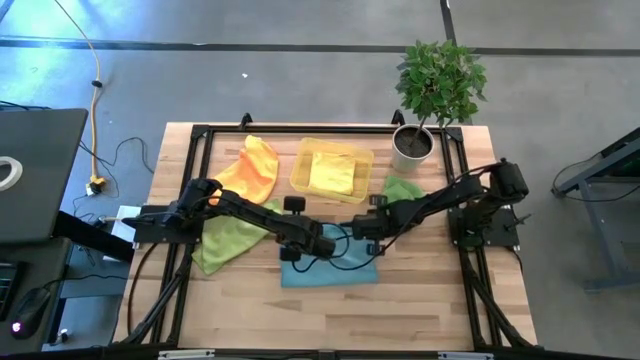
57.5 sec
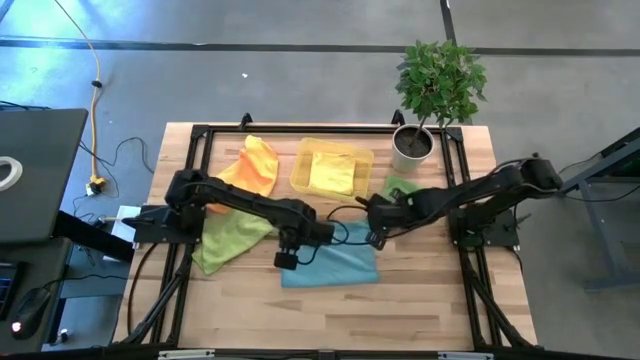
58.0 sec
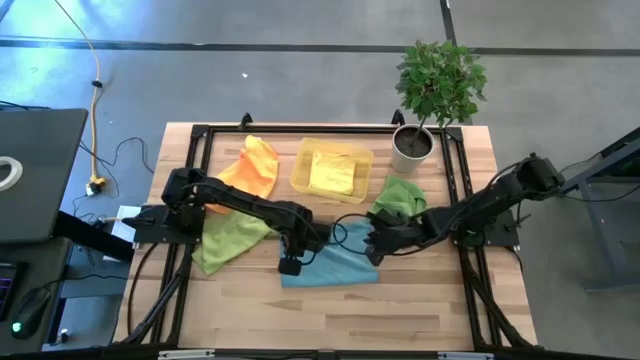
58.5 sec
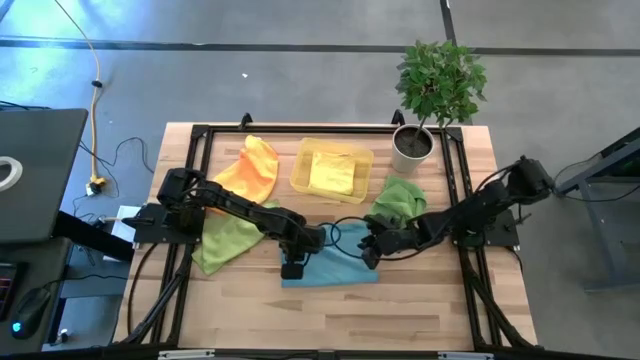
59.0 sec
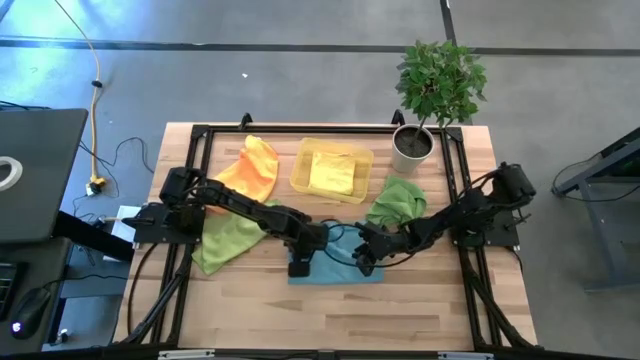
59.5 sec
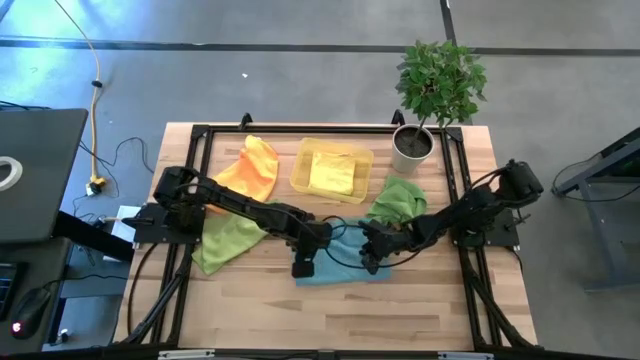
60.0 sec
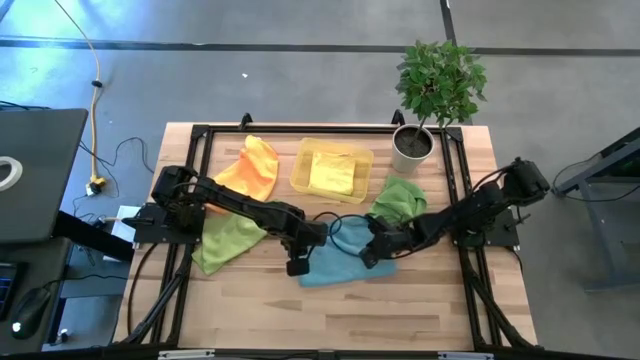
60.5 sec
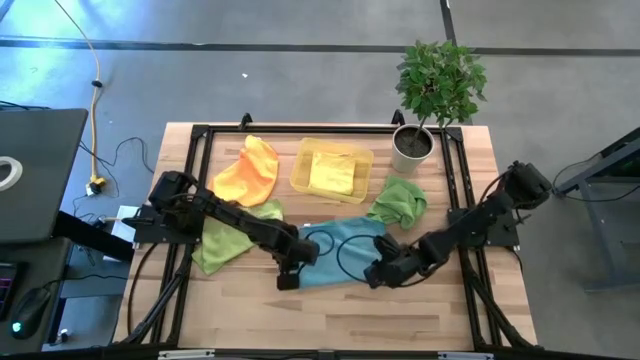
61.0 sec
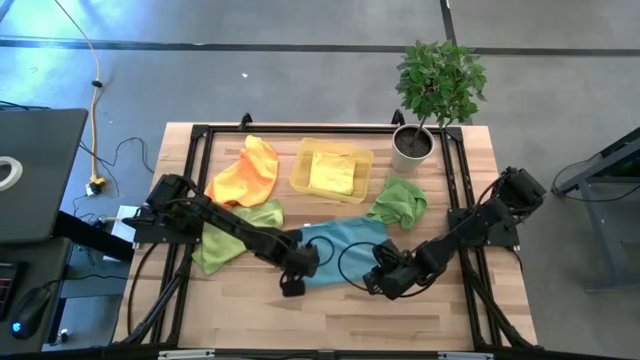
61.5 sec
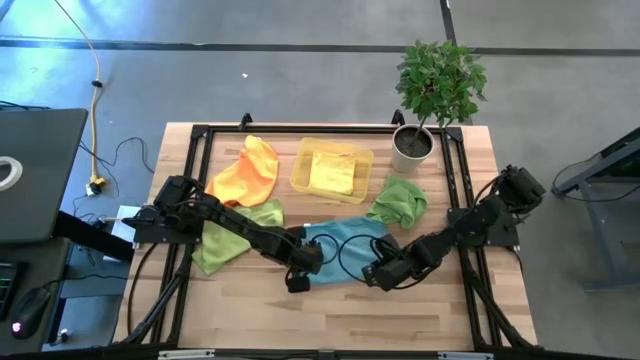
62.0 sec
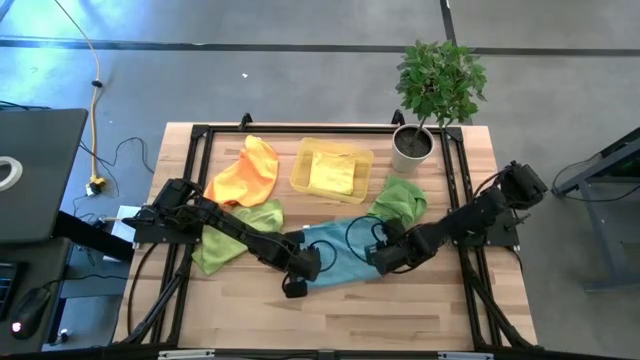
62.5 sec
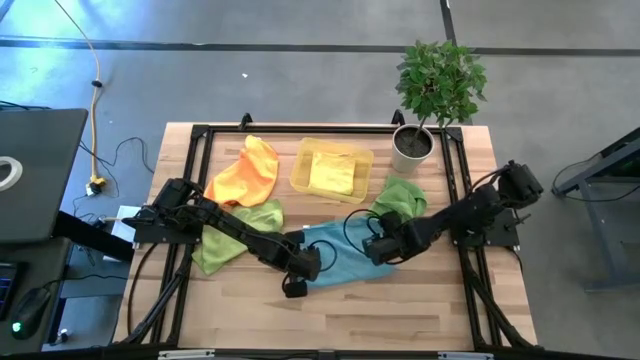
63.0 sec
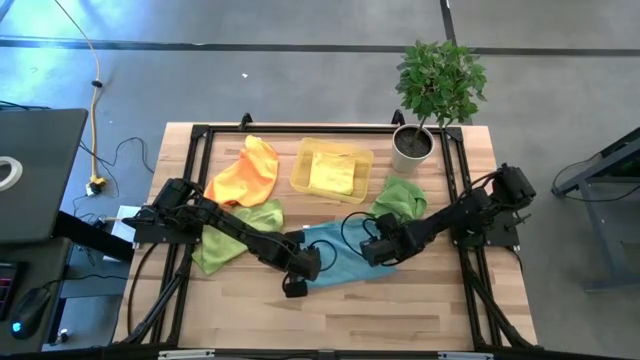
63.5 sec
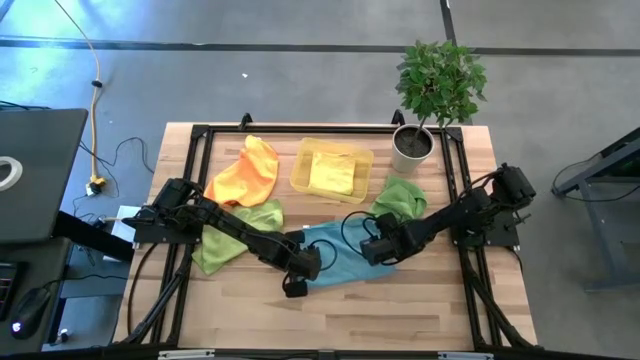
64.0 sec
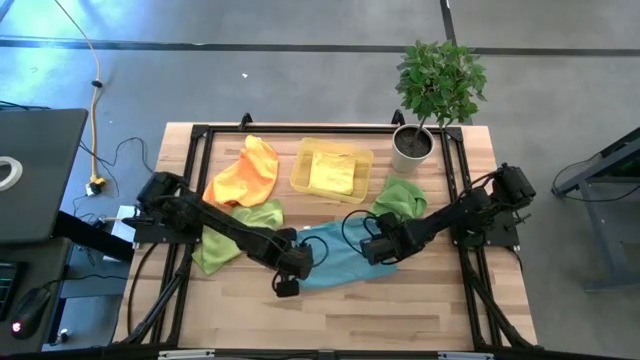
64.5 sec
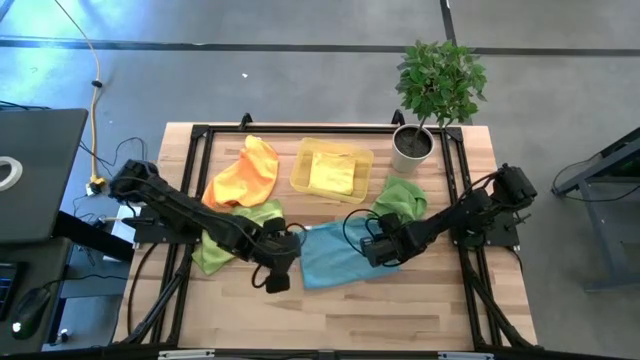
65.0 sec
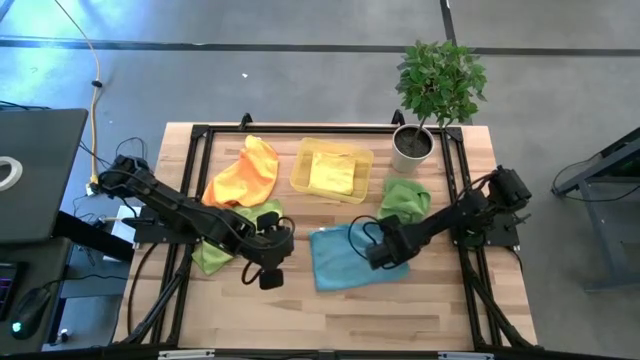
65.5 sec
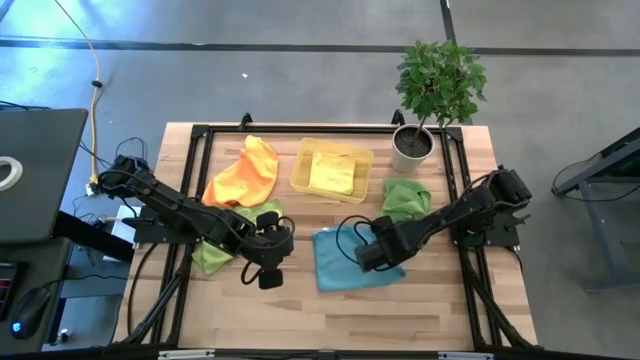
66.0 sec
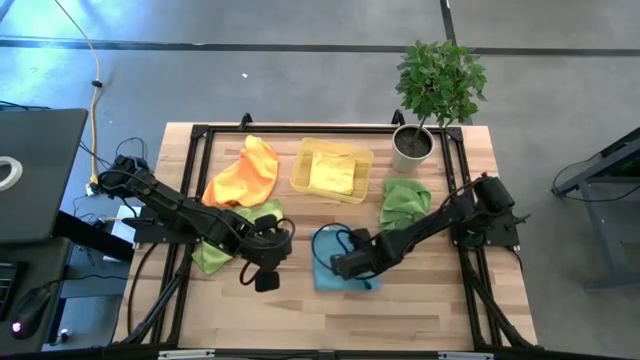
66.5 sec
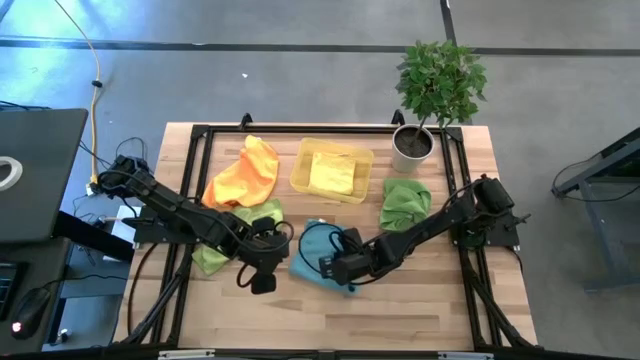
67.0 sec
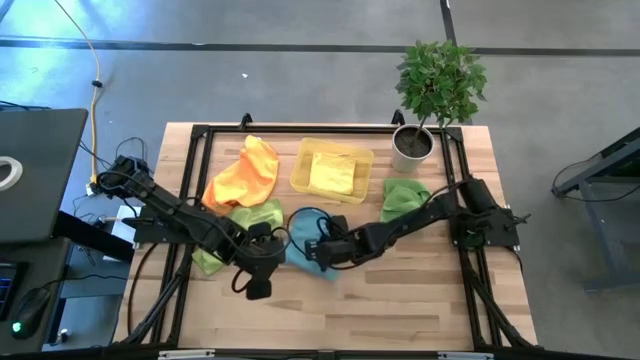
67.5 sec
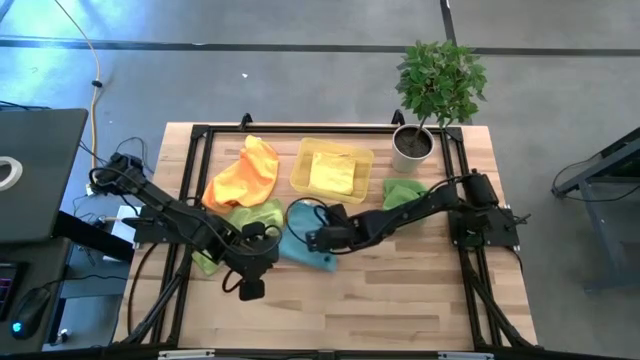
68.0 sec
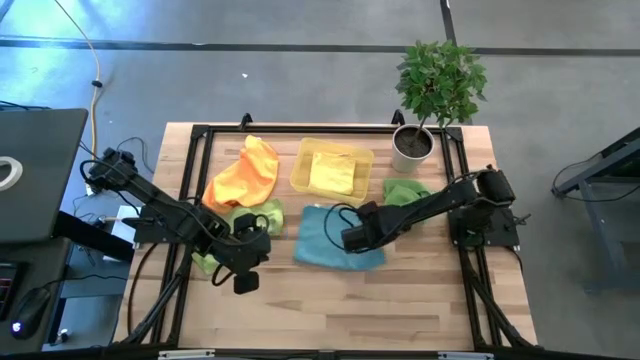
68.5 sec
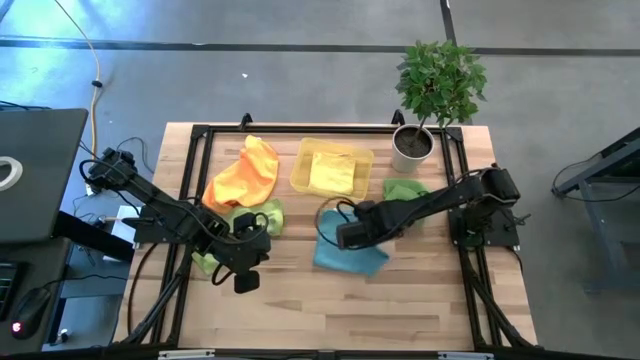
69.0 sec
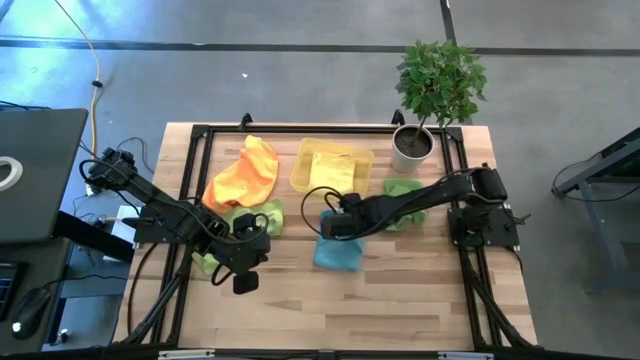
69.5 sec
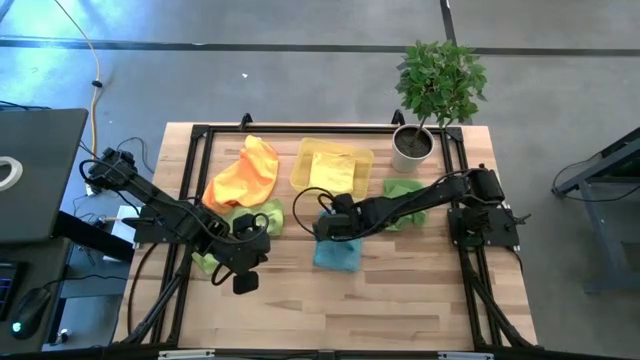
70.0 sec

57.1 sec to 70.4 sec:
Task: Fold microfiber towels
Fold the blue microfiber towel

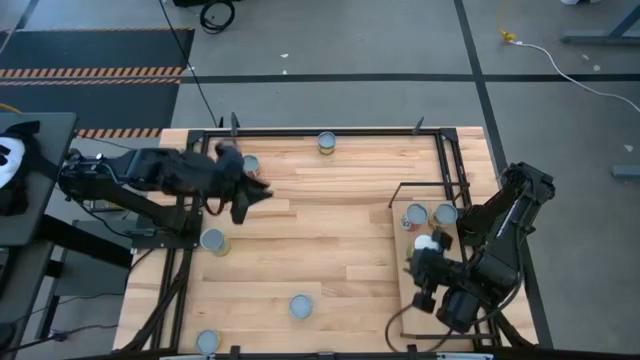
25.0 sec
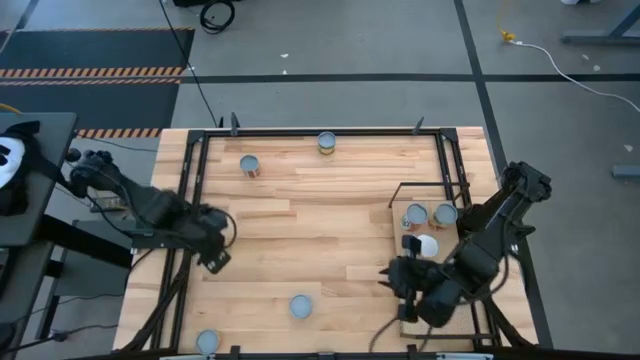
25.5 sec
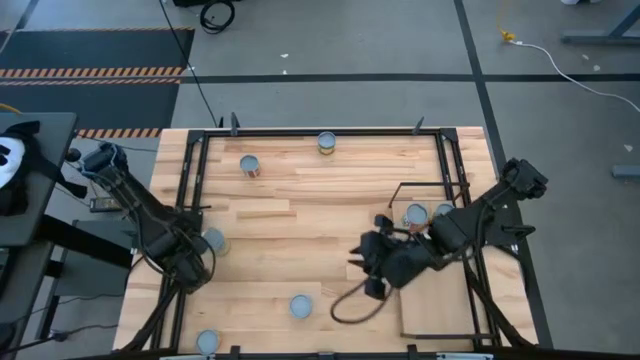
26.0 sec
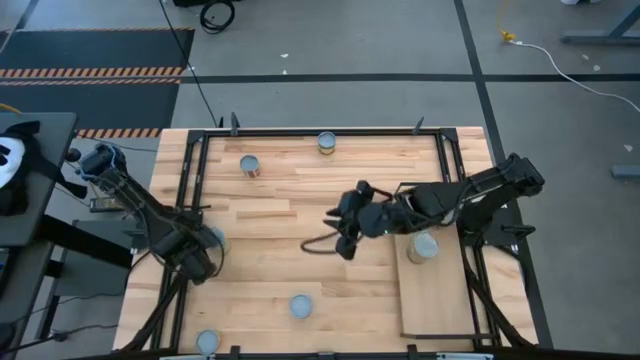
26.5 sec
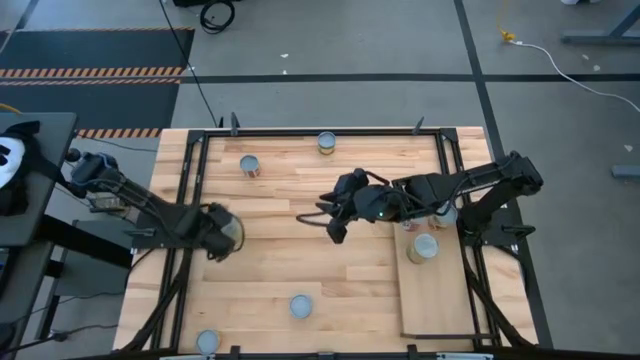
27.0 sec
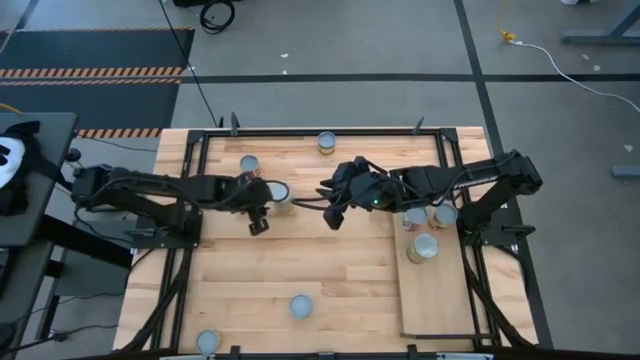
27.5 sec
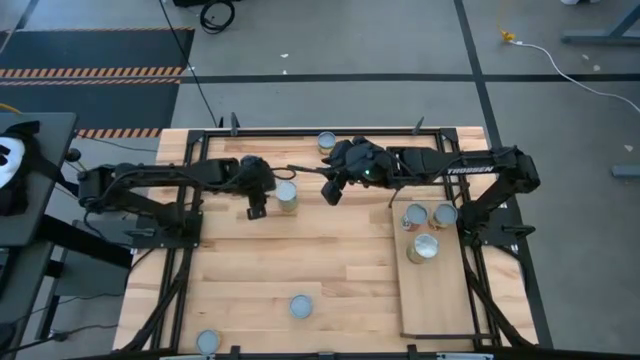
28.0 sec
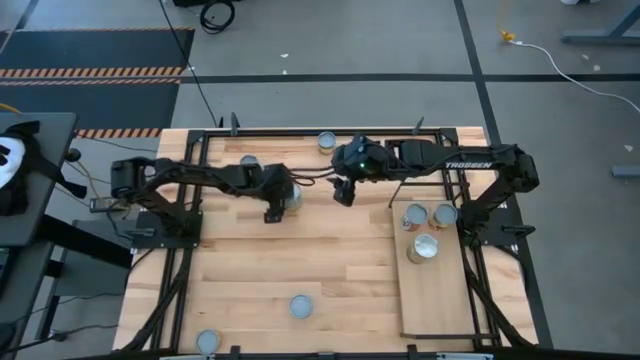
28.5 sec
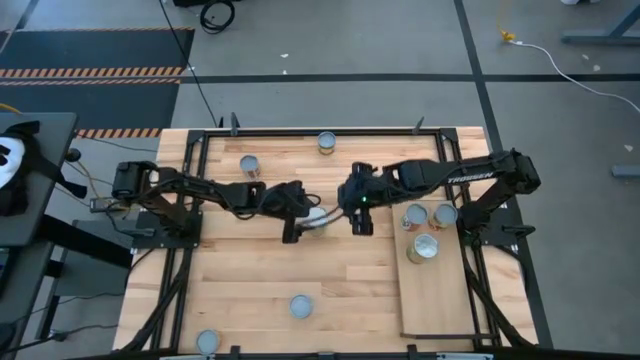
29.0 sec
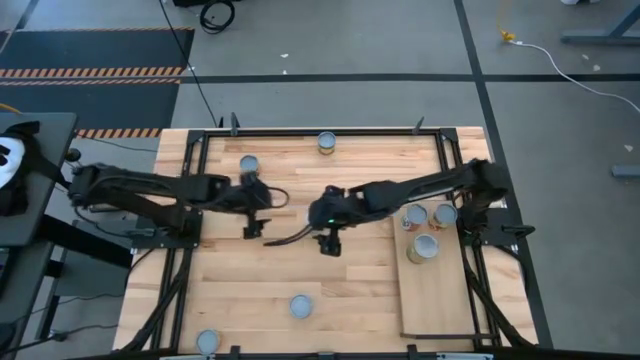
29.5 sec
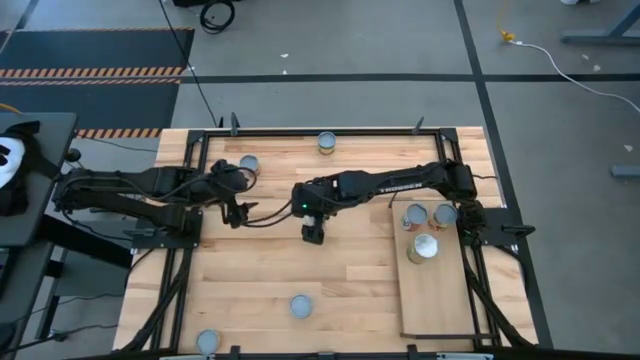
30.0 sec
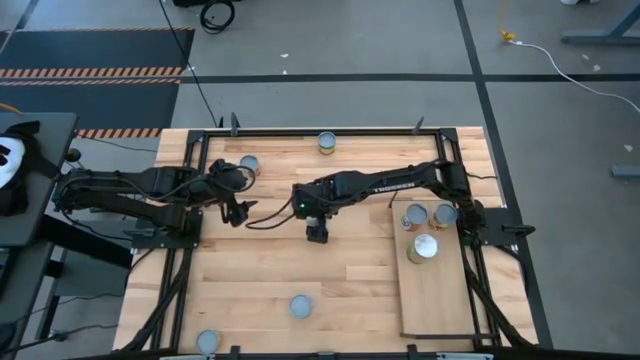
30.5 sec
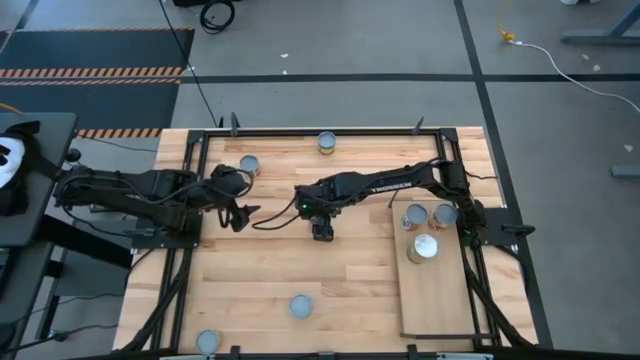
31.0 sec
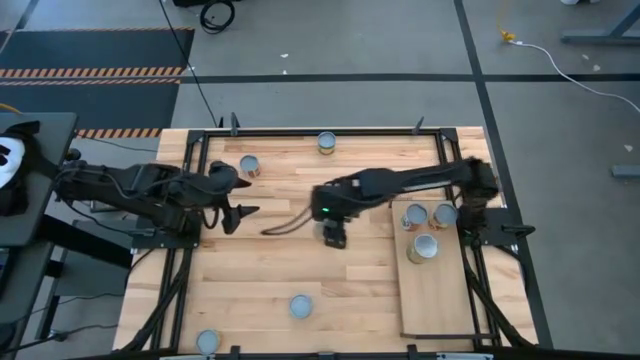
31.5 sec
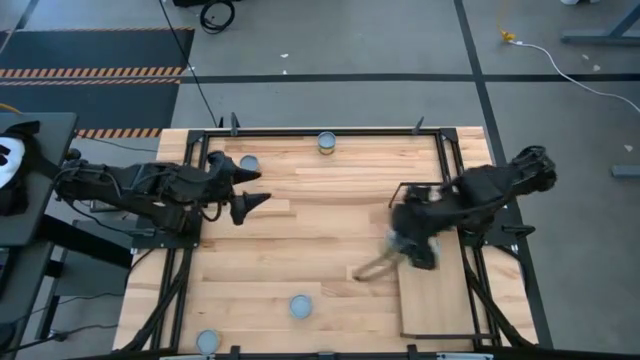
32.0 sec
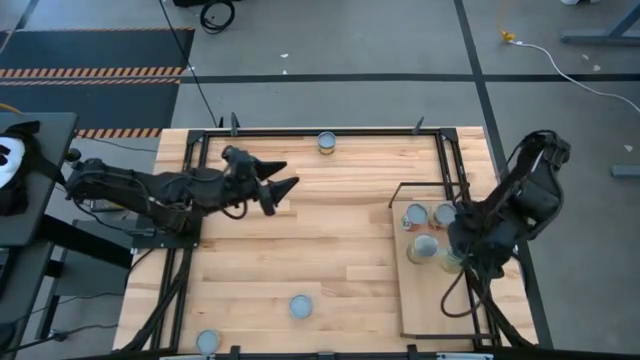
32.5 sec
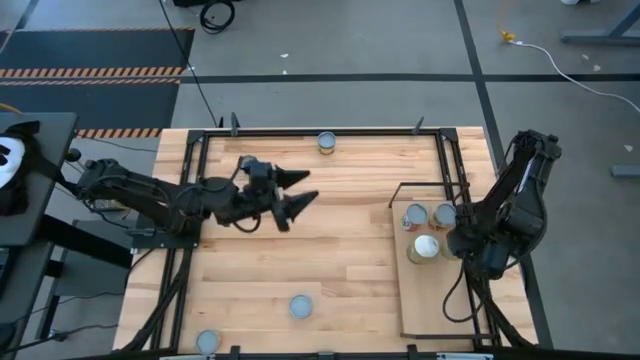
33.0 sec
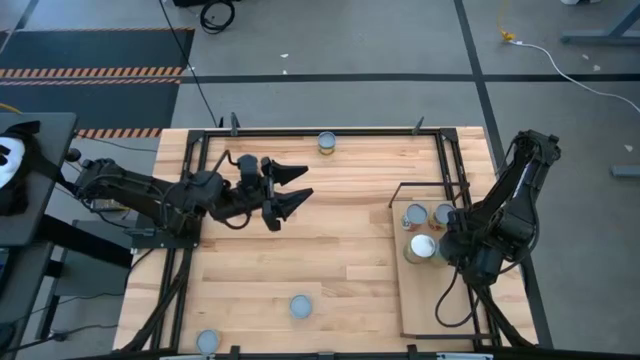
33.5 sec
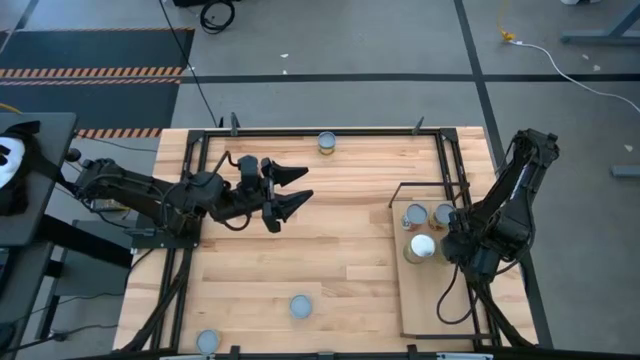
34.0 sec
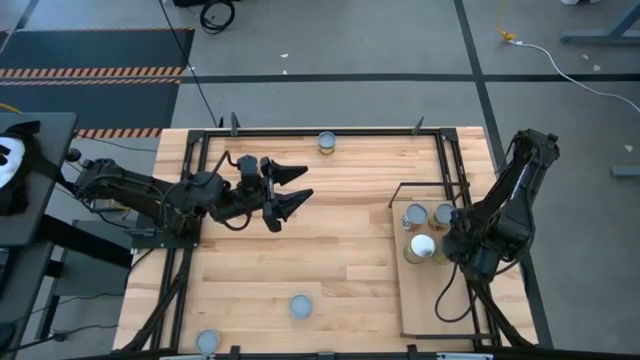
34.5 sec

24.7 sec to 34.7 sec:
Task: Pick and place cans onto a shelf
Put the canned carrots on the shelf
